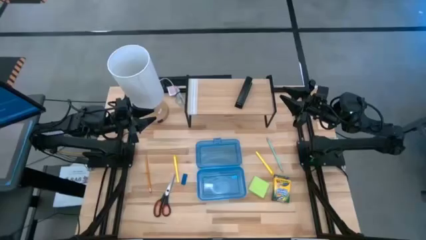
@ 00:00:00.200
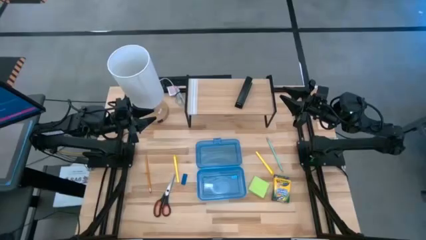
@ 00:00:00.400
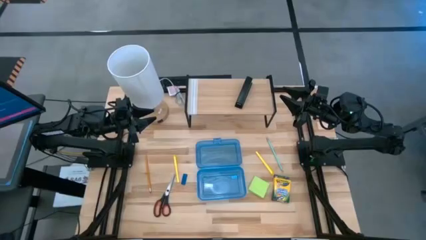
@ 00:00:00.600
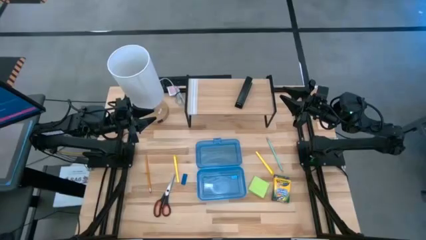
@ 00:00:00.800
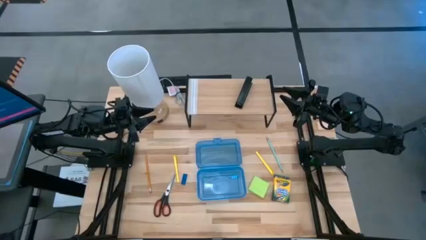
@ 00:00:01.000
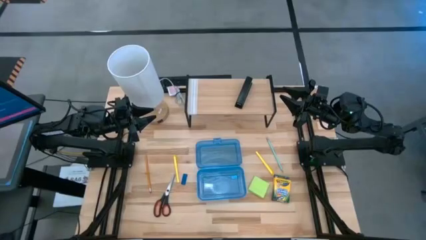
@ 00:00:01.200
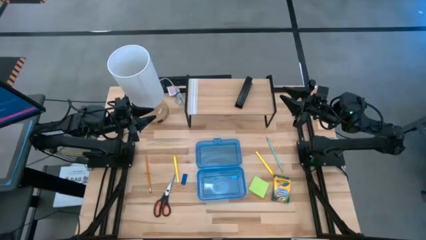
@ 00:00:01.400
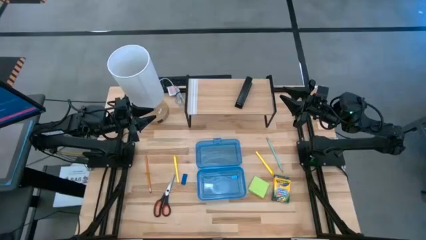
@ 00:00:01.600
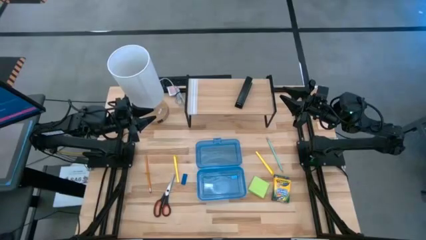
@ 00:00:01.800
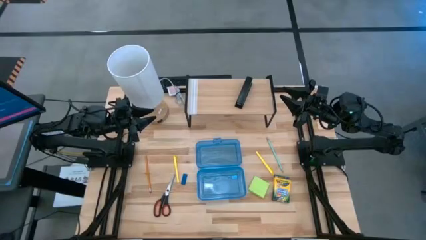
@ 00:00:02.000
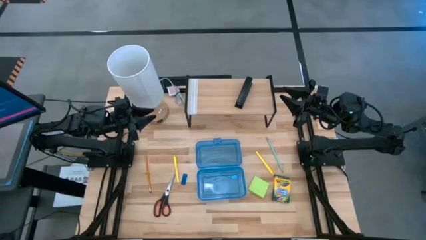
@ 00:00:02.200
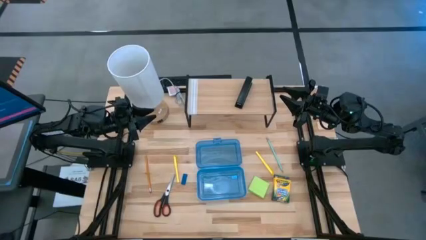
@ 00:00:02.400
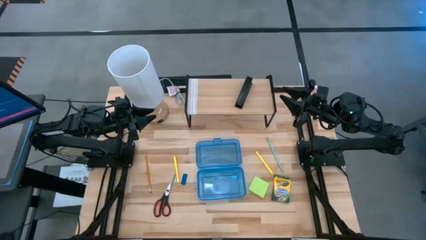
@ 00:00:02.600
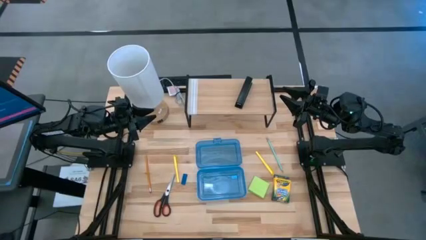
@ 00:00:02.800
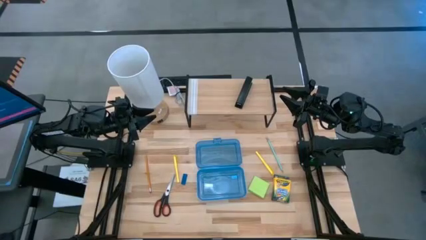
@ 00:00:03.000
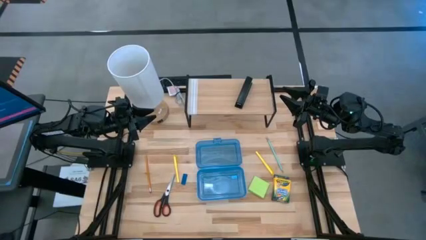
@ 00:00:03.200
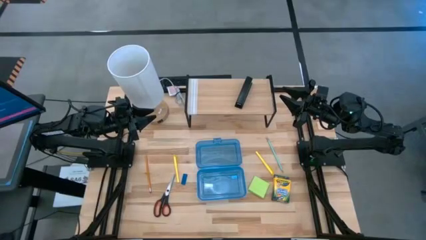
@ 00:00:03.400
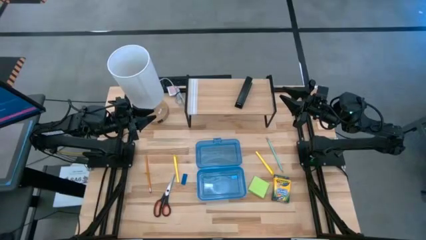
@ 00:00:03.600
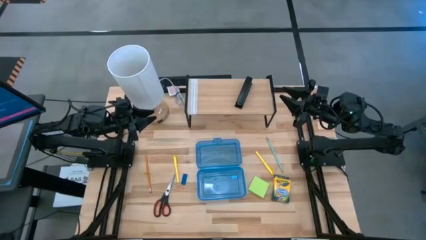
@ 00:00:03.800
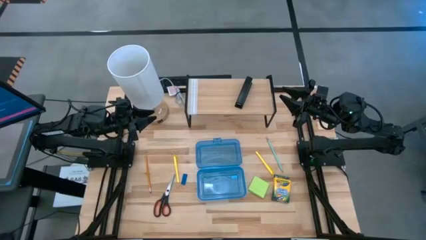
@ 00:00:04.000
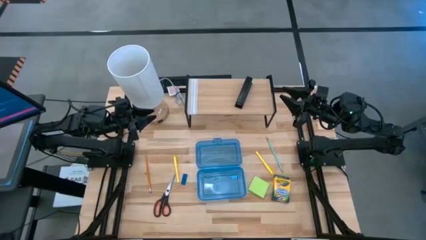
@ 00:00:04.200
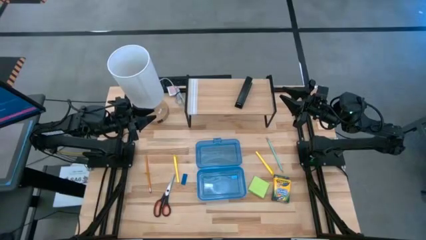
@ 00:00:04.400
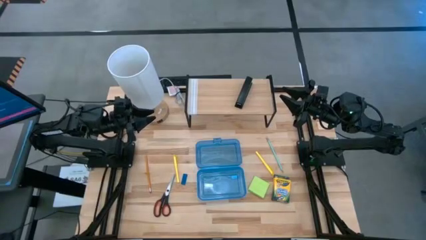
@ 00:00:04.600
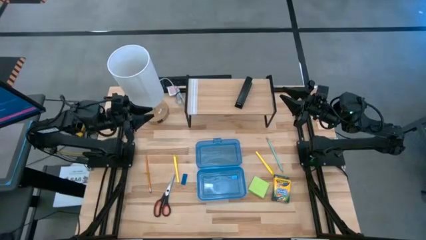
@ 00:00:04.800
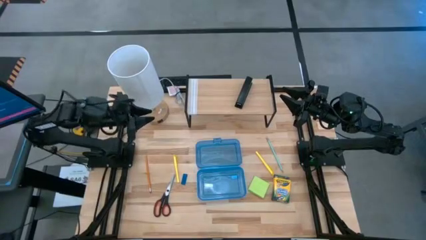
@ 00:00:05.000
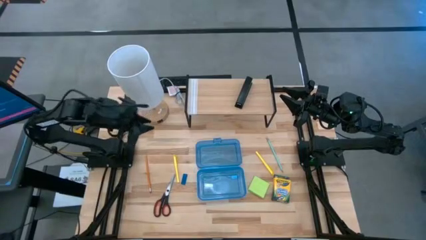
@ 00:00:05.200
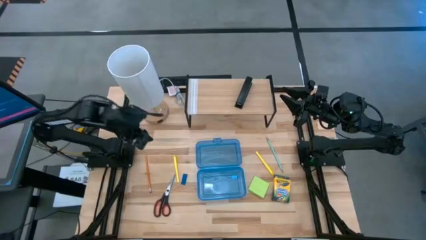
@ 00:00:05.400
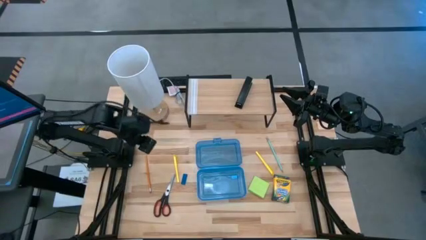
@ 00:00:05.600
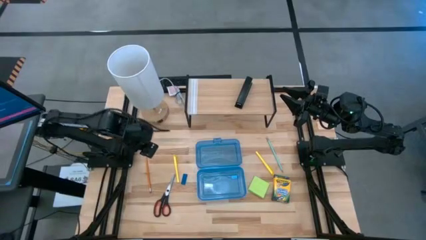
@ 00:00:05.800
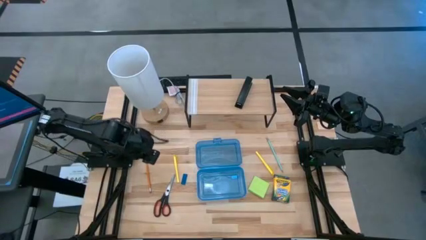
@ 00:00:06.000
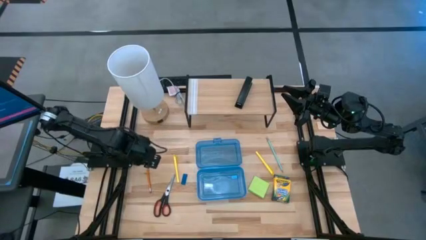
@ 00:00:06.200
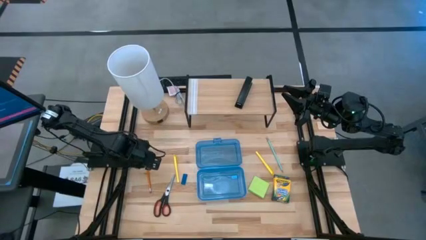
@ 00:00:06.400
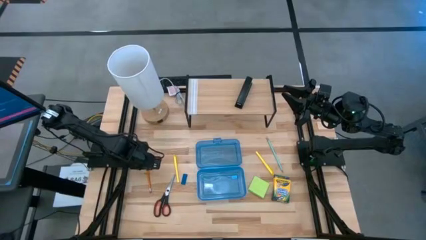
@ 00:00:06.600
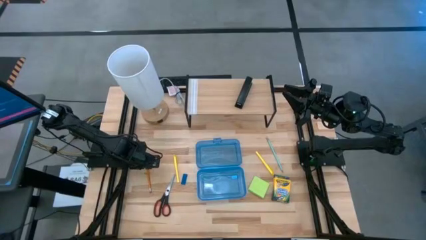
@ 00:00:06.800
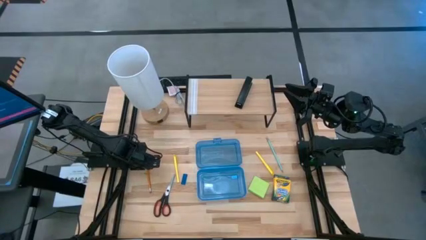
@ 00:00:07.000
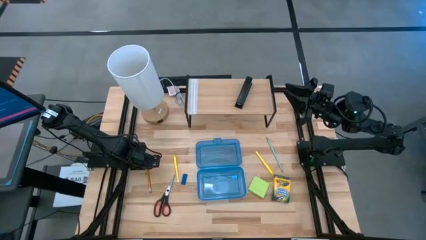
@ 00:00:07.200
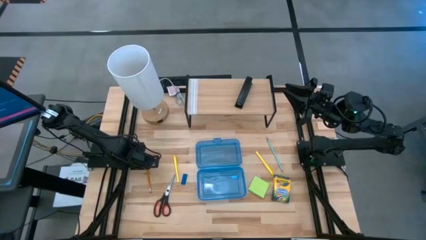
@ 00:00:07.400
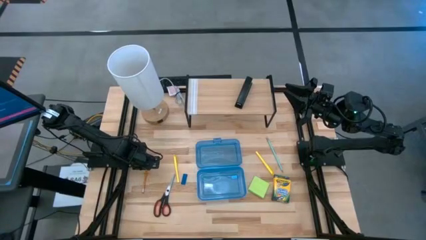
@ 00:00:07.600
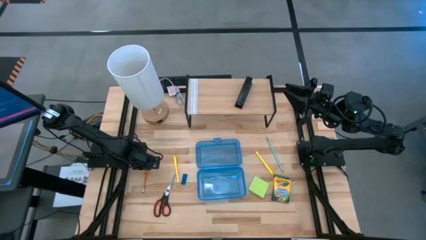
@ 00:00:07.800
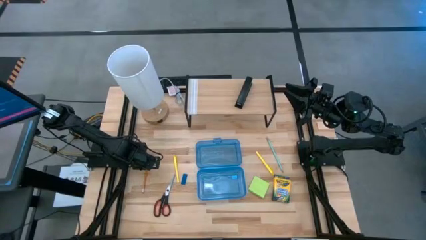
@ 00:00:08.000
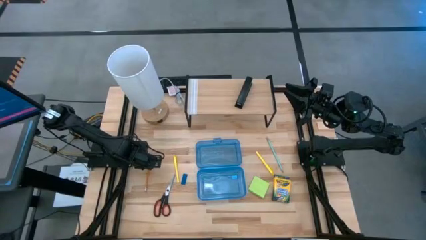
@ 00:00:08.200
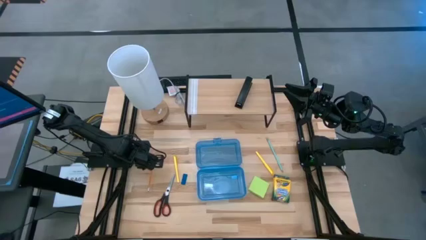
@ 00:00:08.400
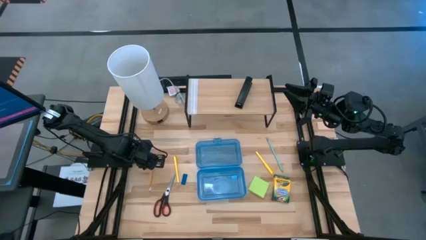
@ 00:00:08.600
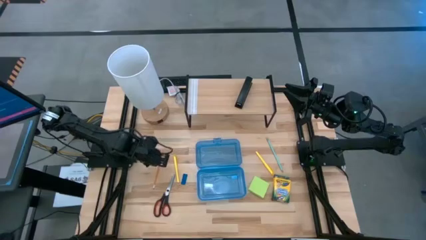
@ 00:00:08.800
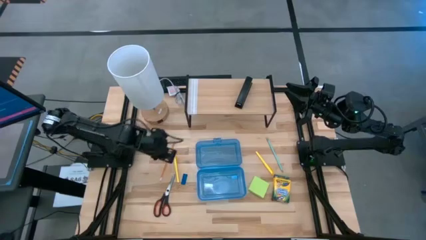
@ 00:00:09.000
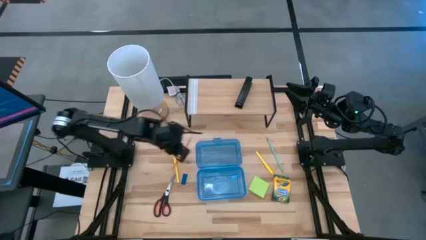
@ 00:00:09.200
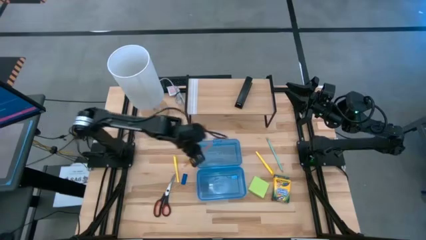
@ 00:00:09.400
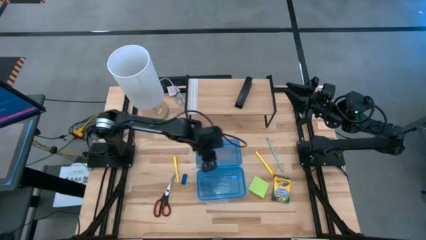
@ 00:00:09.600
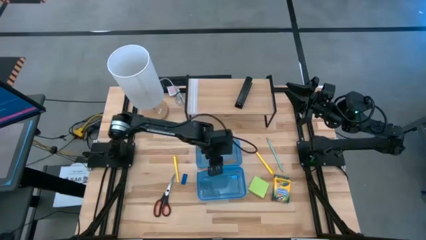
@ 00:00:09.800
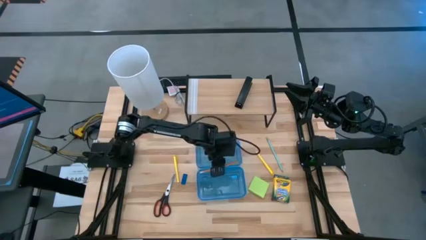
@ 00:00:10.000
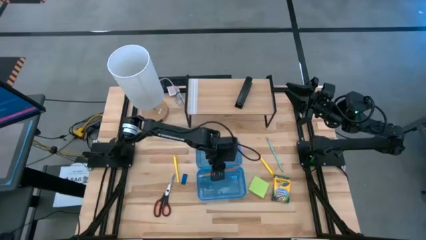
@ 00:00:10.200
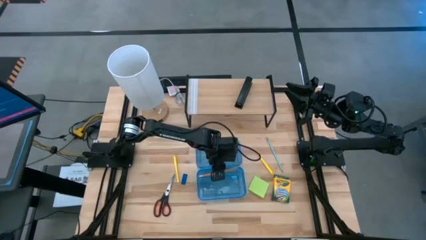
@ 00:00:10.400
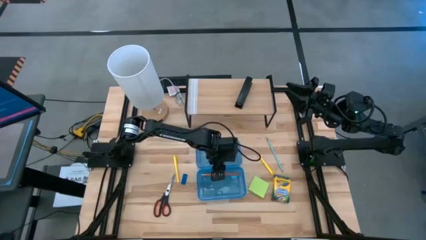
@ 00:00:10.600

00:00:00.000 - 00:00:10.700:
Task: Pack school essentials
Put the left orange pencil into the blue supply box

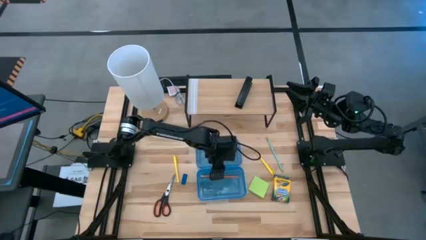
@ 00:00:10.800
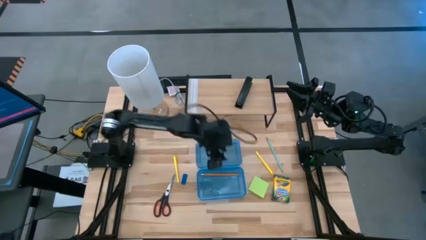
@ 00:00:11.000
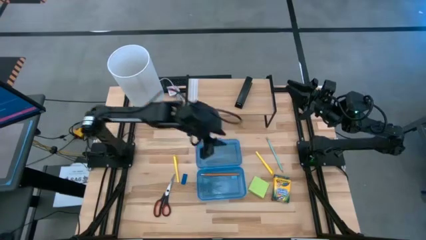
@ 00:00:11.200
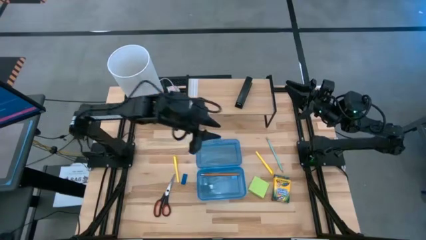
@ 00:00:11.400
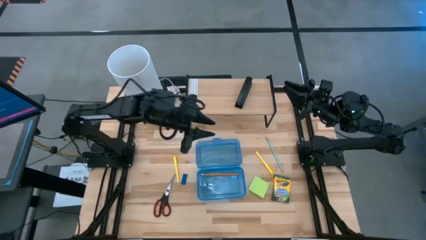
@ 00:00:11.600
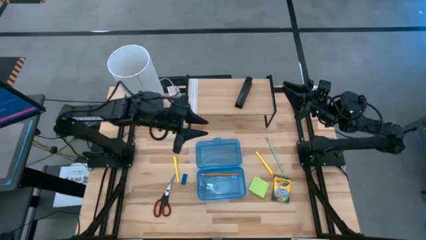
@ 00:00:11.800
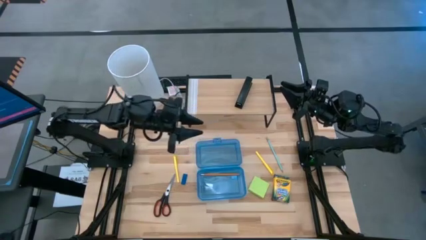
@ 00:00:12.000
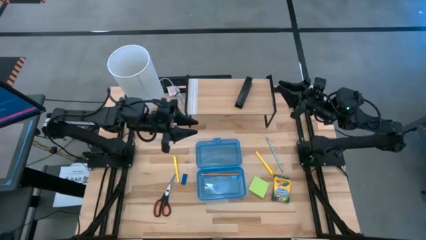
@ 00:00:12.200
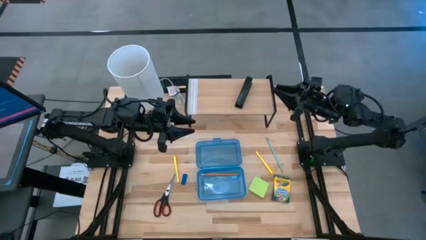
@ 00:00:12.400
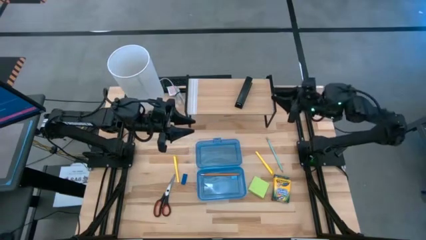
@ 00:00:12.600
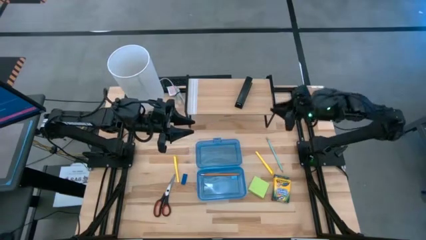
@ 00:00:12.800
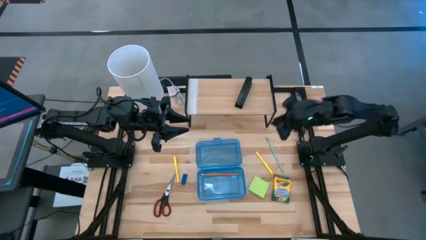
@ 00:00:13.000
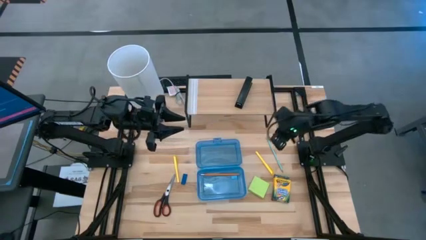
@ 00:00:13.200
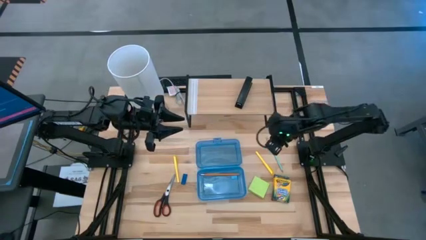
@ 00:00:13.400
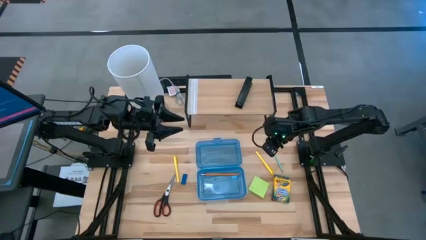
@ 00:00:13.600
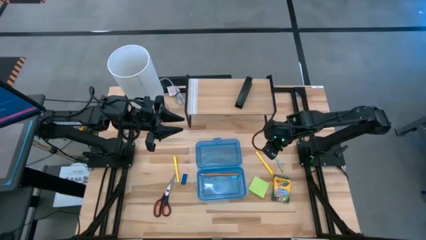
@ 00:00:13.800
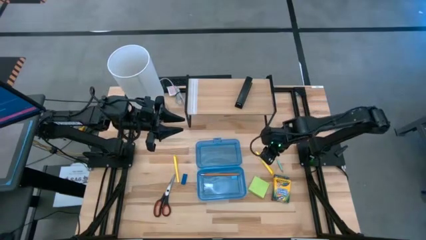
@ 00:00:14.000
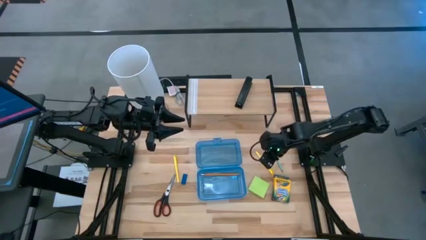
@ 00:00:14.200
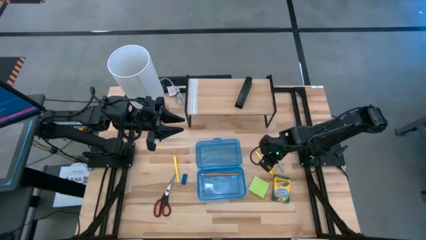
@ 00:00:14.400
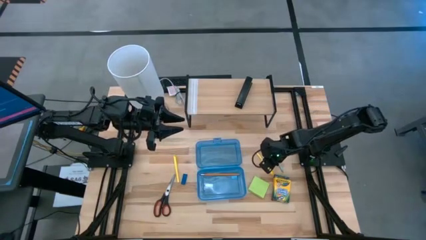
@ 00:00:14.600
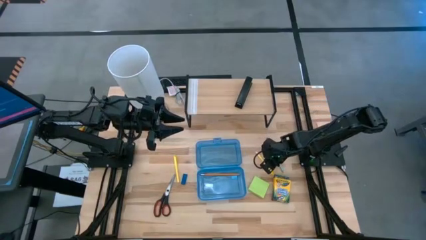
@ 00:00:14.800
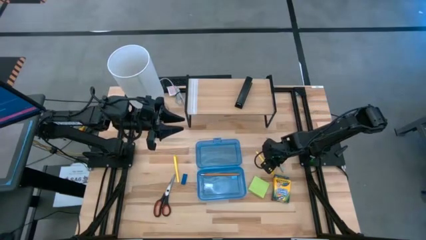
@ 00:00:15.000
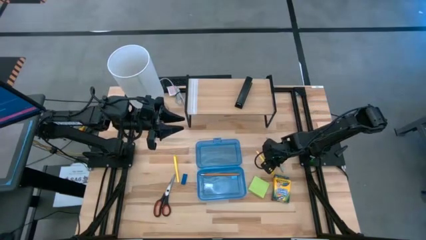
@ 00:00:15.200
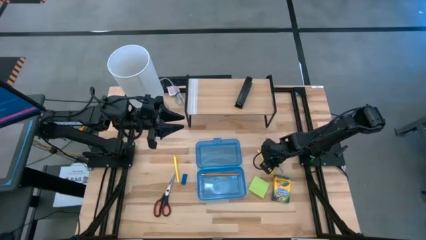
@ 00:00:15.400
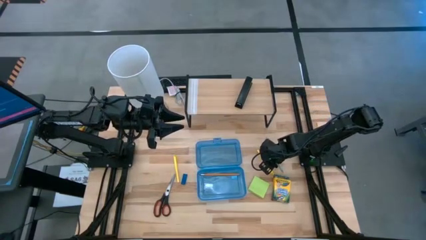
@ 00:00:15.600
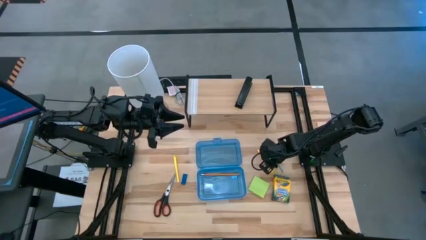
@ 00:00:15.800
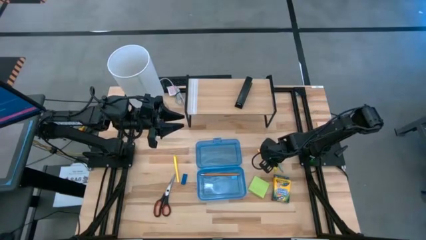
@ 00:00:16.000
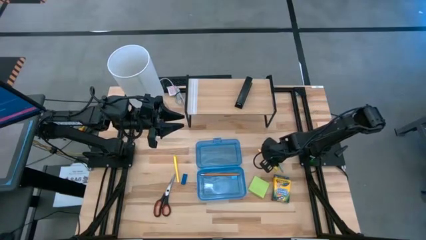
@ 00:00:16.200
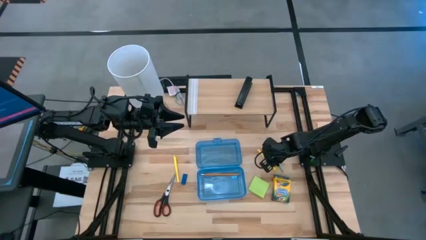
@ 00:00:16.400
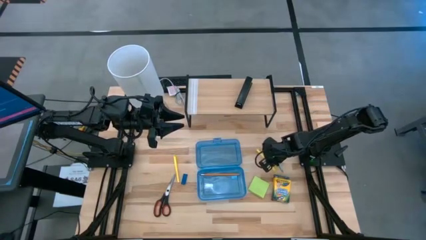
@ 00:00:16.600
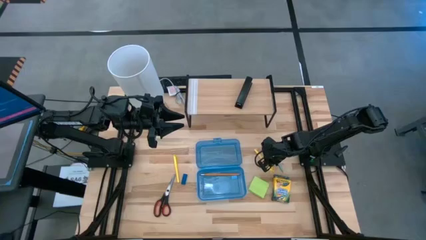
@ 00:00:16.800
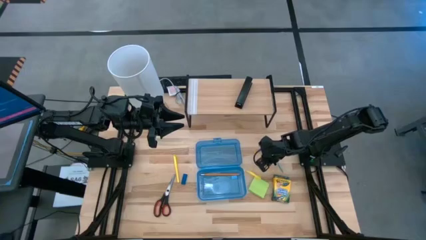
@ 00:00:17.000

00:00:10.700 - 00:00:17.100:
Put the right yellow pen into the blue supply box
